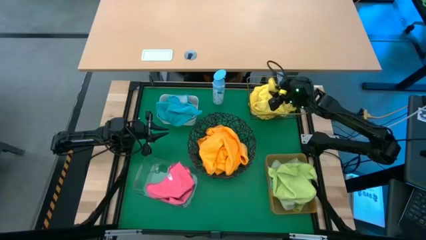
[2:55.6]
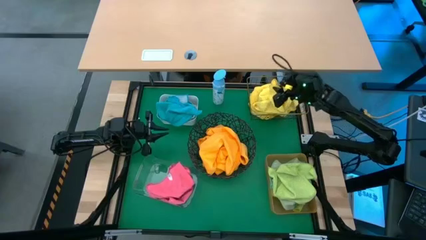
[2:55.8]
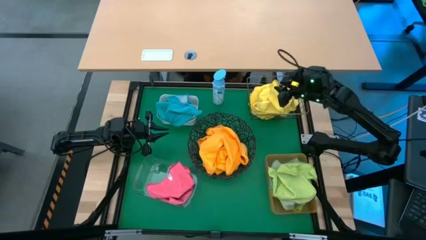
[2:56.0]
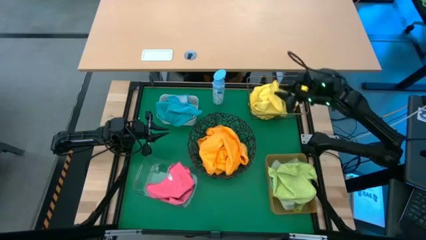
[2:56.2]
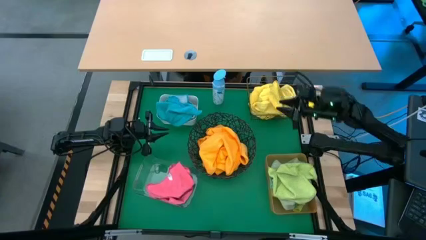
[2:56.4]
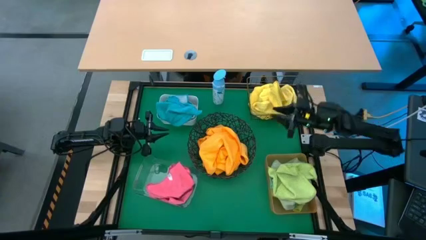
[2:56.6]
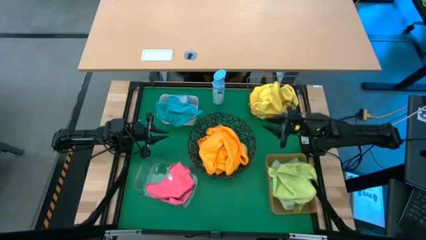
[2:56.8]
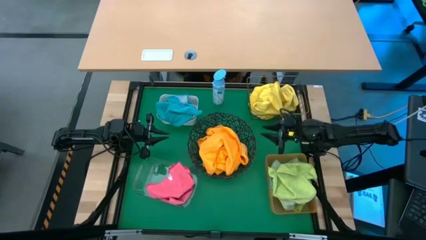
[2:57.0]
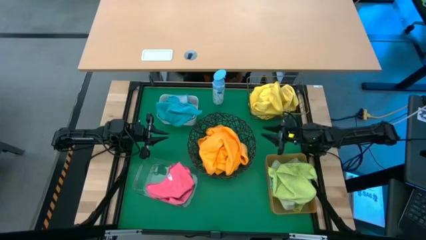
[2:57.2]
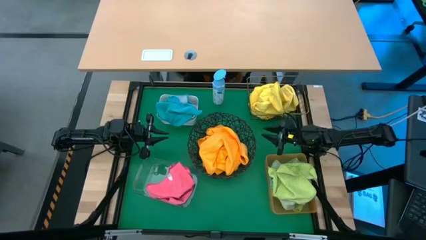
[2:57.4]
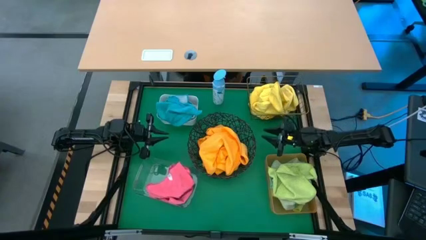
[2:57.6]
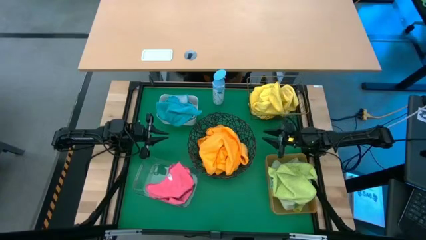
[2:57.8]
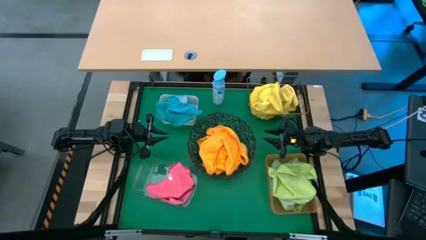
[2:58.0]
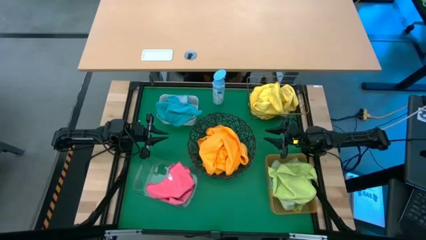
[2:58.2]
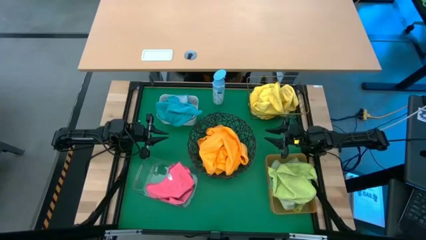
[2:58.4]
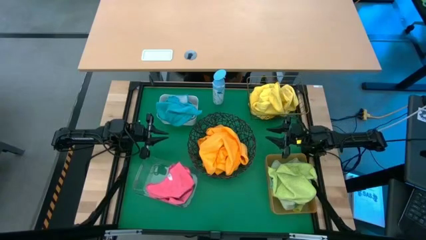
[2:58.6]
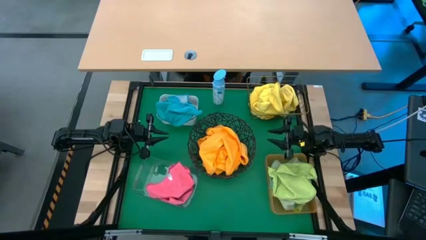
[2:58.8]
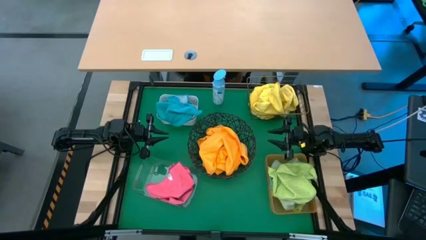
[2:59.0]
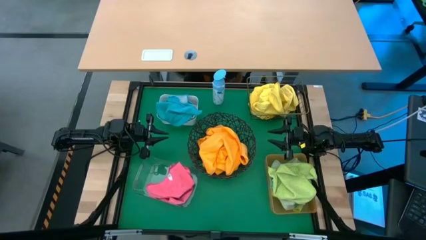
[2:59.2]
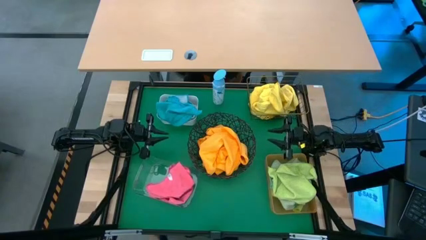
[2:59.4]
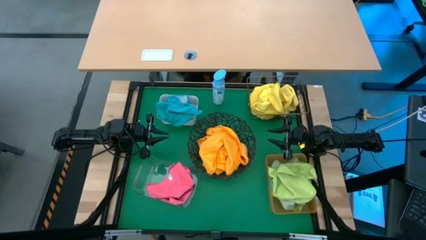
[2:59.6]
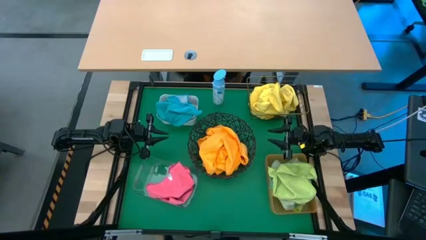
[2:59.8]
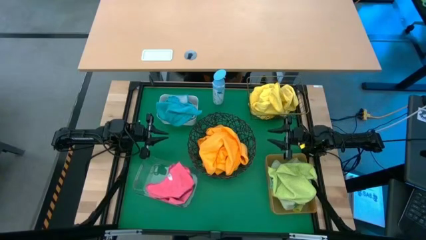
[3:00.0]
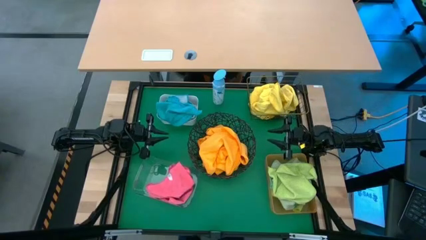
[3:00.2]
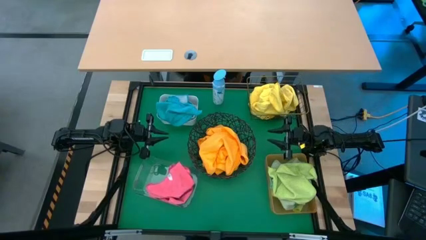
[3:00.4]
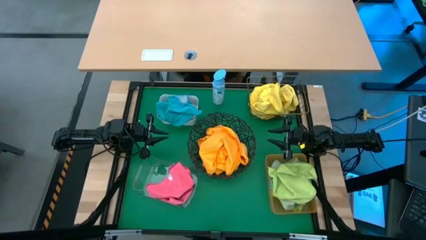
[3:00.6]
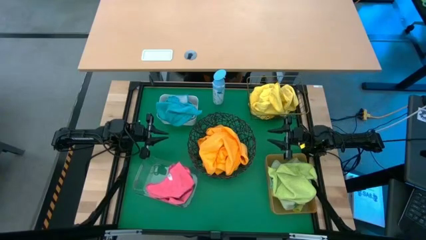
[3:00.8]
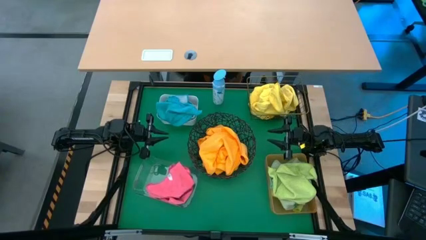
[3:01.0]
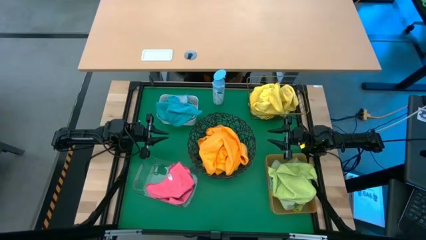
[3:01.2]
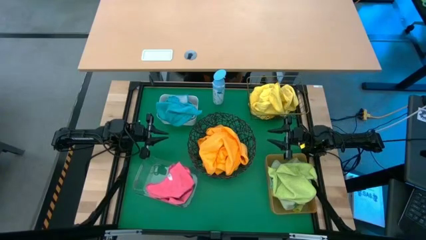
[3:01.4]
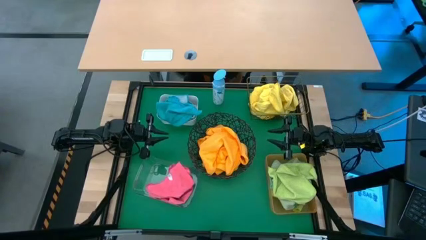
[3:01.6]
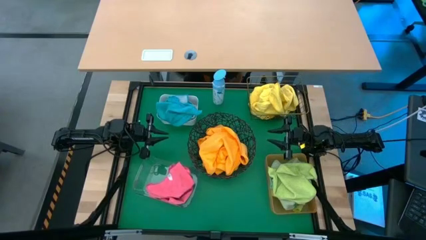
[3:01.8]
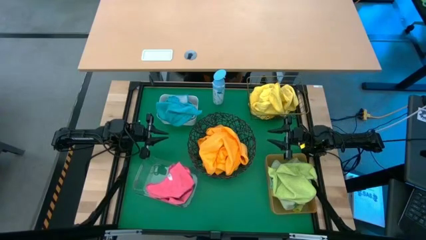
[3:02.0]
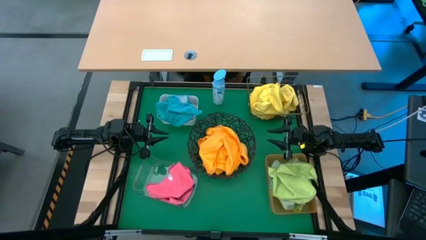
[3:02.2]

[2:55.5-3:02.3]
Task: Sort microfiber towel by color & place in baskets
Return to Home Position

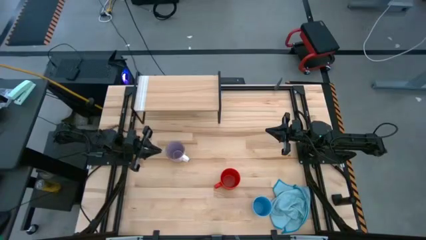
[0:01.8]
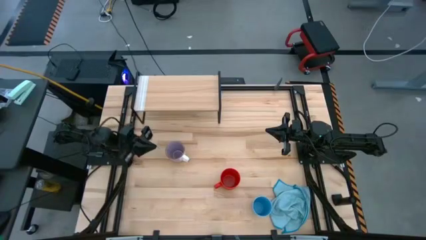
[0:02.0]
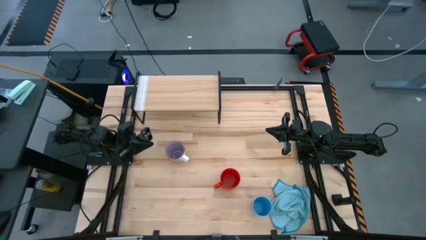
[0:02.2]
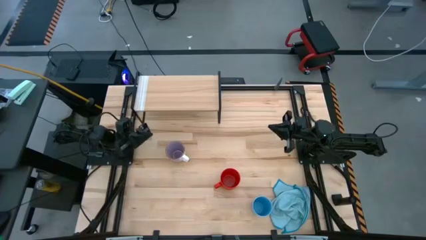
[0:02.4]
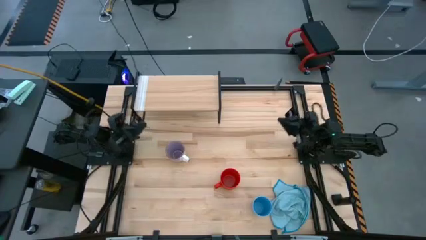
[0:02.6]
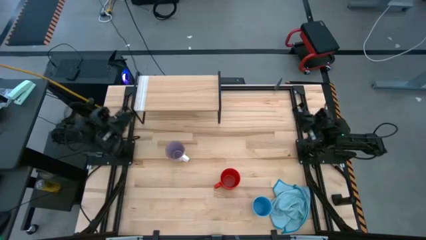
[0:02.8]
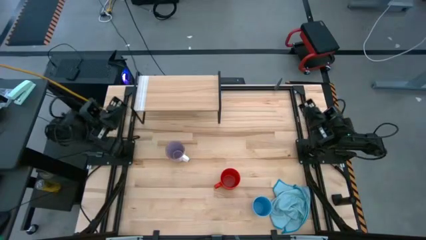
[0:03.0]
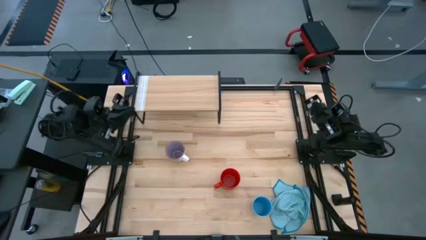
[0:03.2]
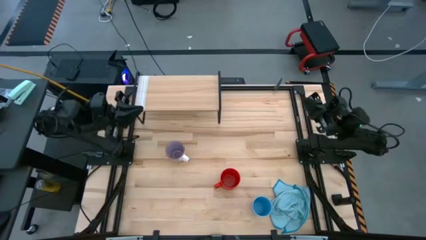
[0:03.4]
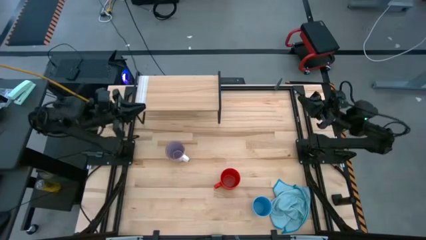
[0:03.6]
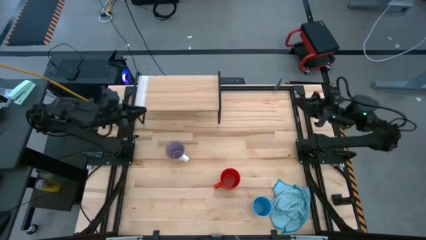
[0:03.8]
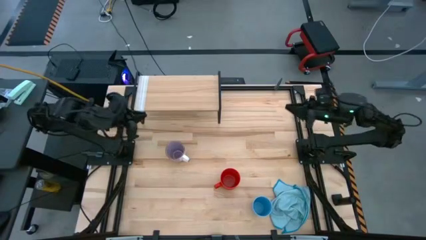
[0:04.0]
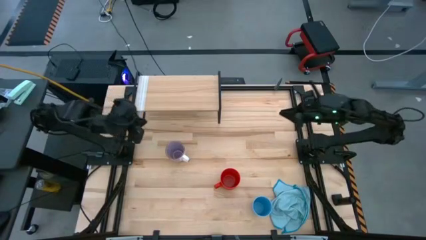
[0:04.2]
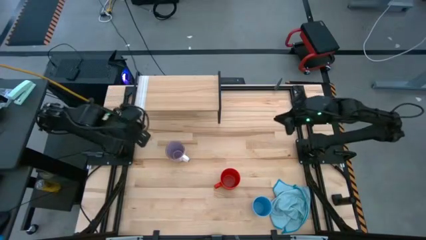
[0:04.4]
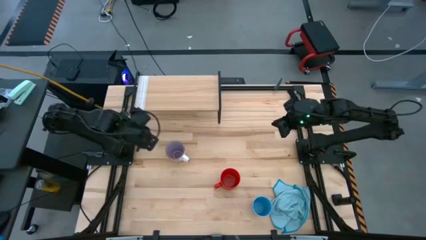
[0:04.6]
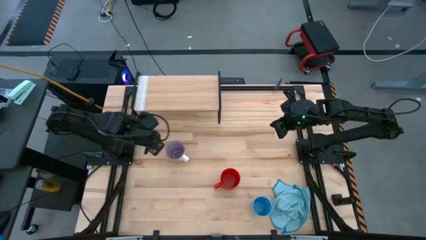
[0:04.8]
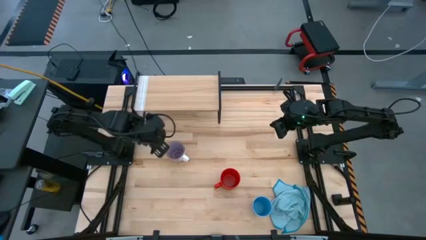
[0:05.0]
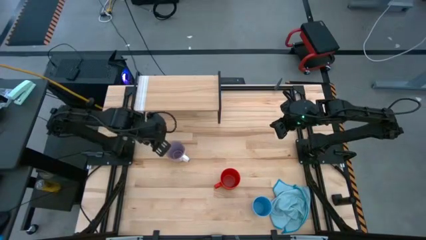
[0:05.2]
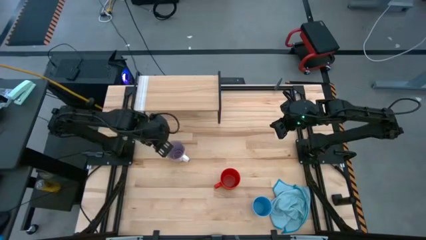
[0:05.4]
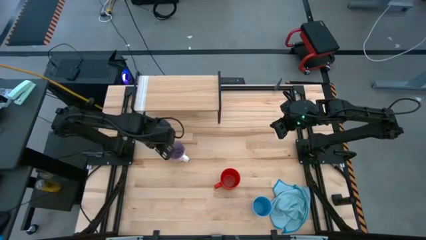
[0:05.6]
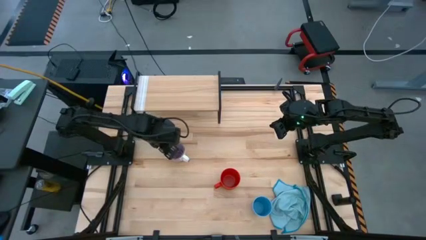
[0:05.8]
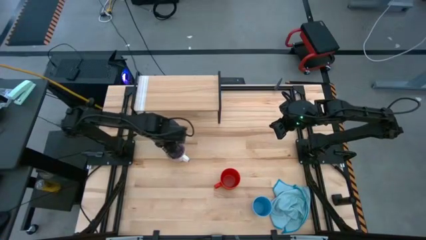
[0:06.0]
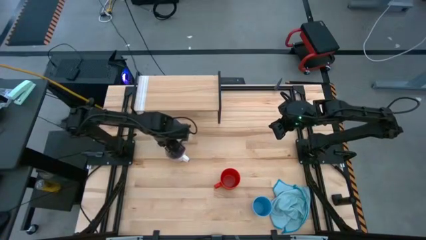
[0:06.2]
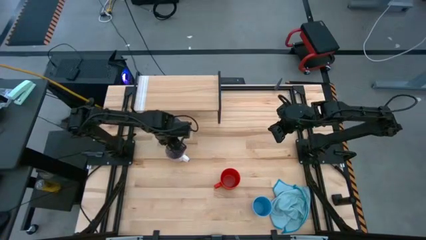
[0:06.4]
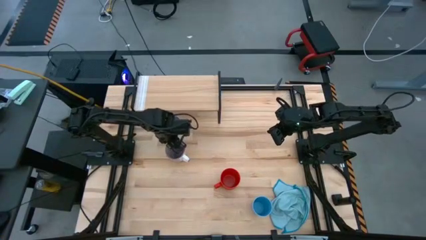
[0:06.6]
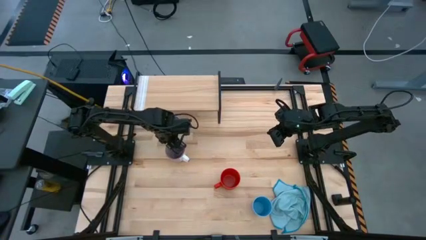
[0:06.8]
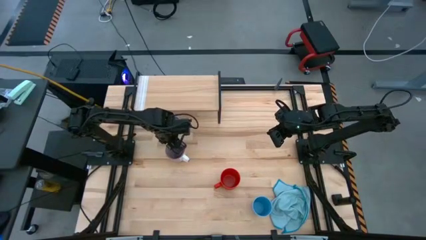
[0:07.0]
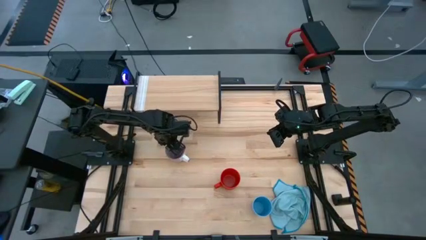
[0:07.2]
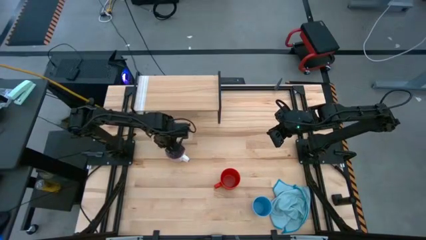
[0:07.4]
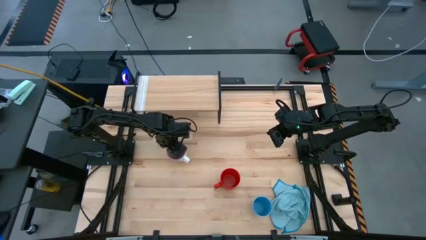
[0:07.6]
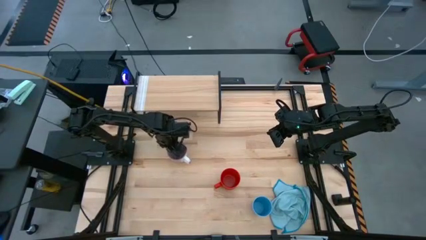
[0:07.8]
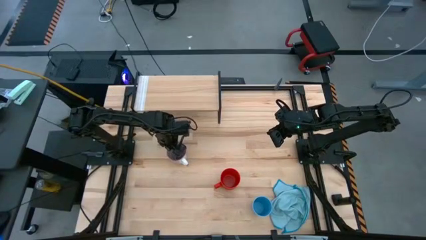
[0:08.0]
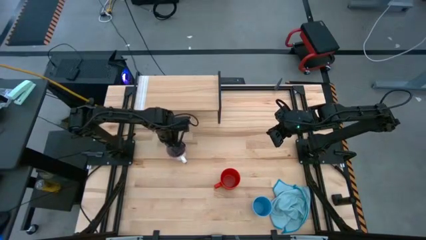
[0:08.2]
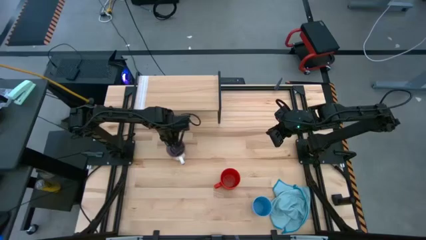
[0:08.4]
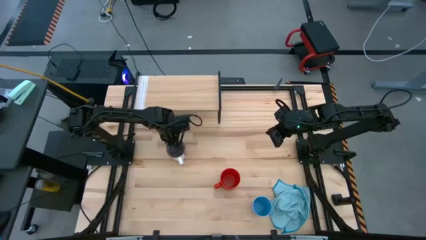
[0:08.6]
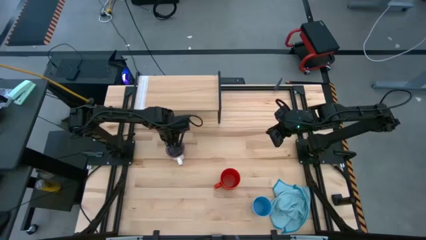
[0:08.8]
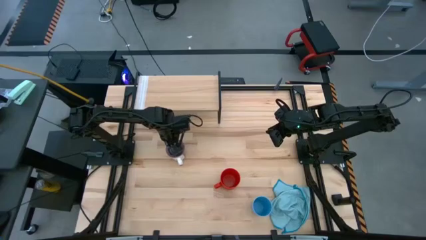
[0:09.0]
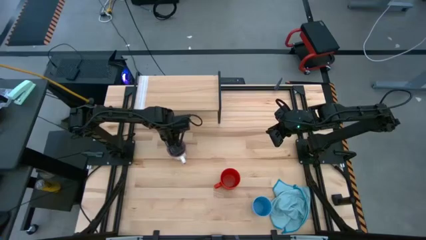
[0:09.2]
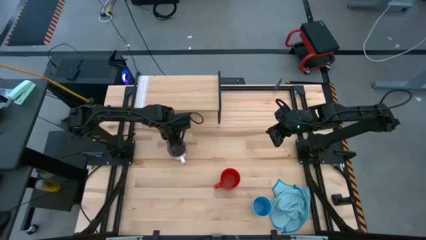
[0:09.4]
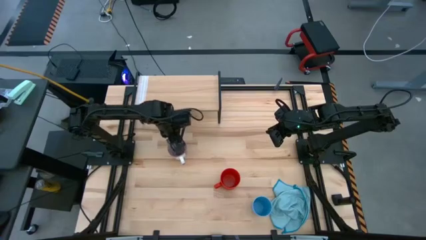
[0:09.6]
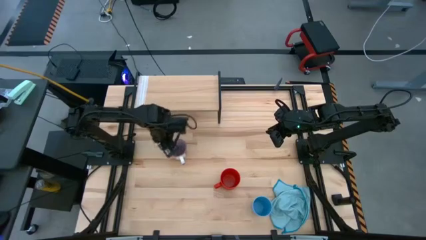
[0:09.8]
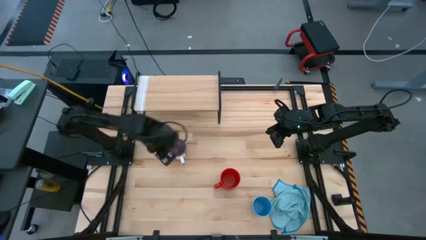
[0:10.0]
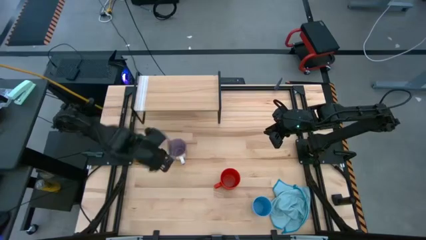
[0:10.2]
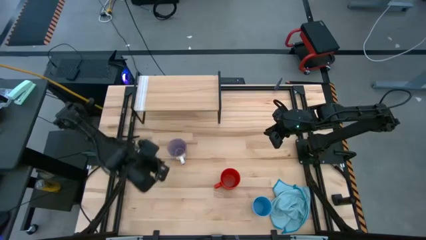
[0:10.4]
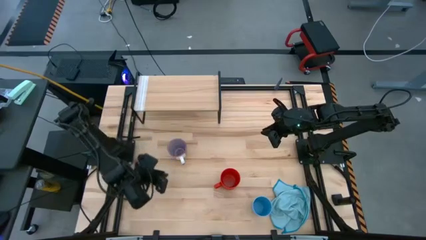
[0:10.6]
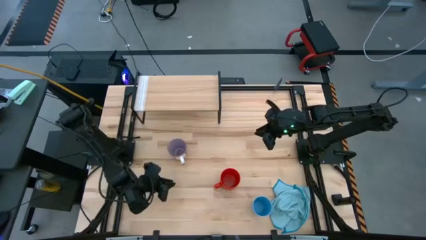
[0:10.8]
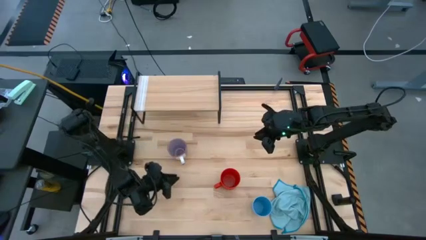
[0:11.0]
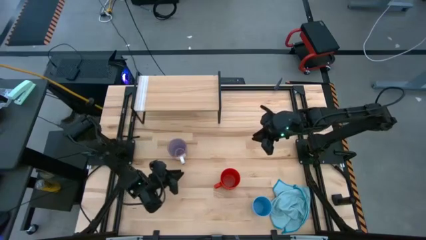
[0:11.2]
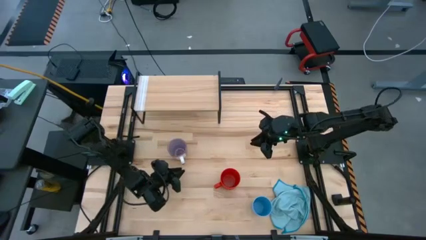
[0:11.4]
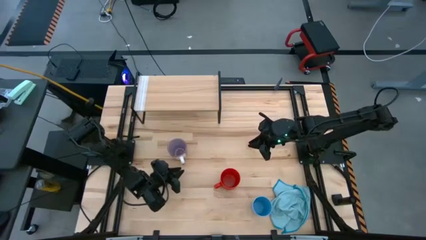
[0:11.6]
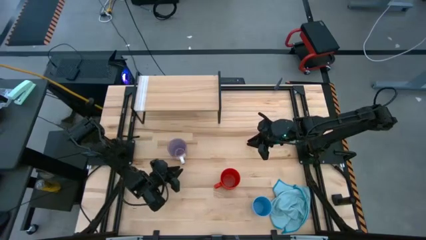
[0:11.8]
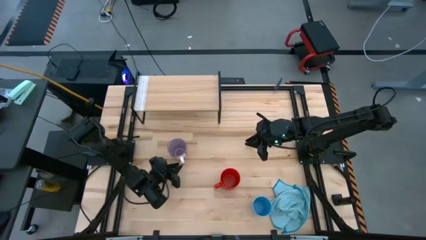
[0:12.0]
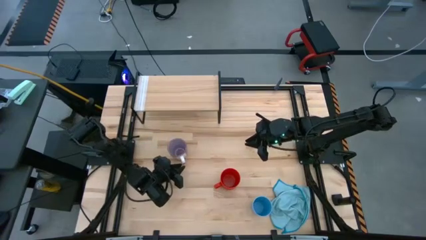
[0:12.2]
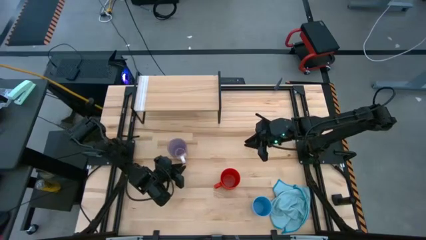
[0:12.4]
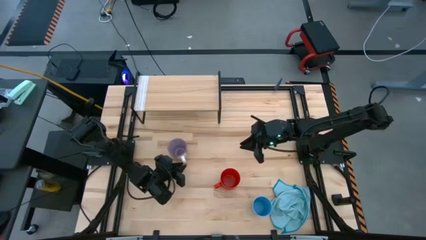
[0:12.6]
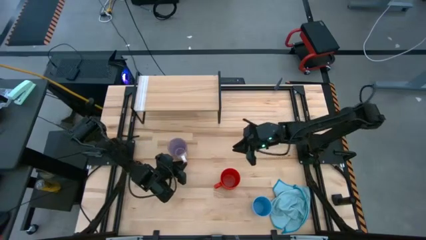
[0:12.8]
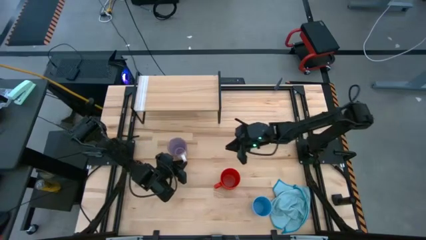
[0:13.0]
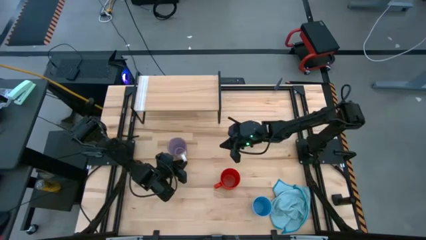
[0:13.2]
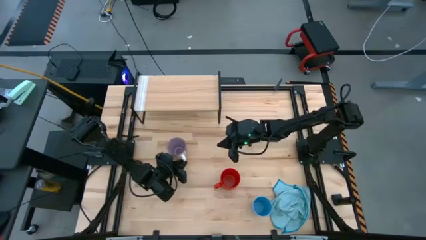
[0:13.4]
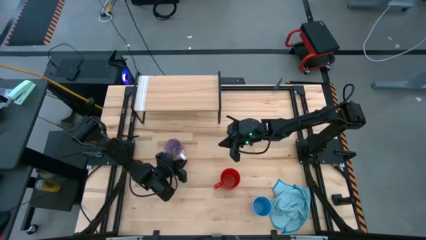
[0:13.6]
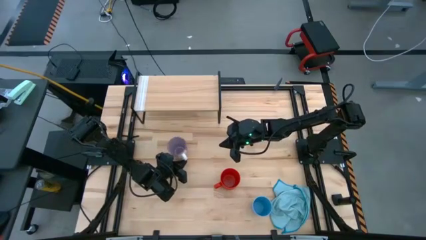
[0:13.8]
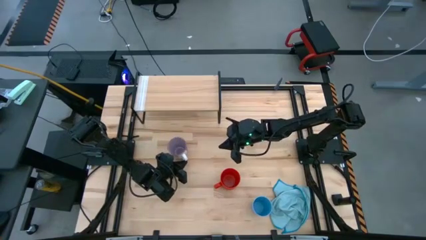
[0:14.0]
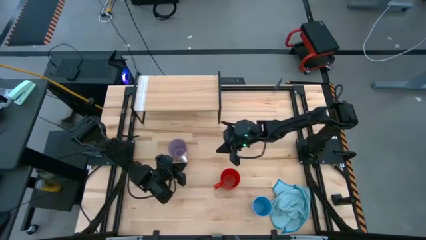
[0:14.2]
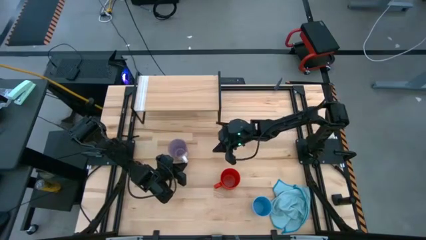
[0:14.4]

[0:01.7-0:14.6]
Task: Stack small to large cups/mugs on shelf
Put the purple mug on the shelf
